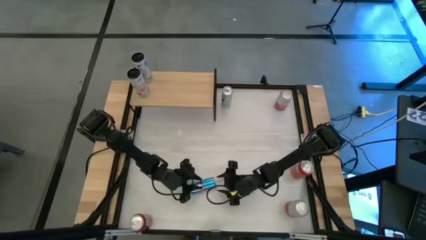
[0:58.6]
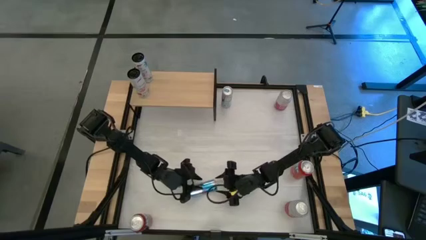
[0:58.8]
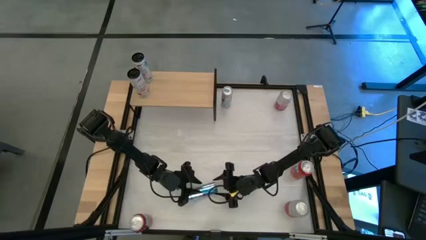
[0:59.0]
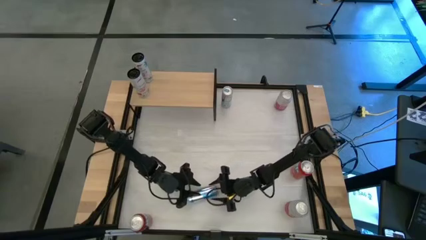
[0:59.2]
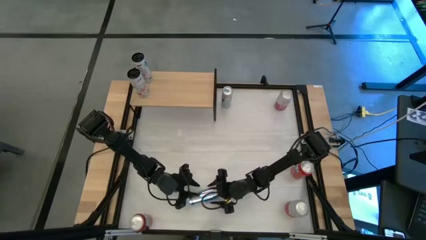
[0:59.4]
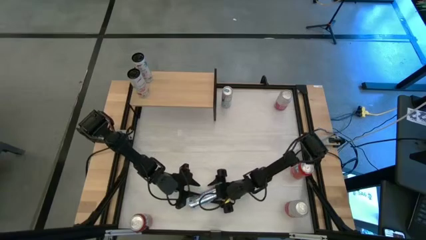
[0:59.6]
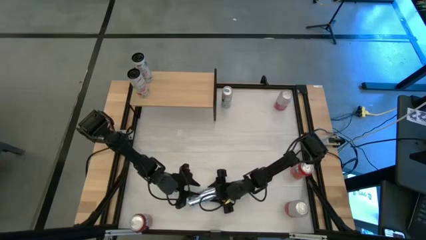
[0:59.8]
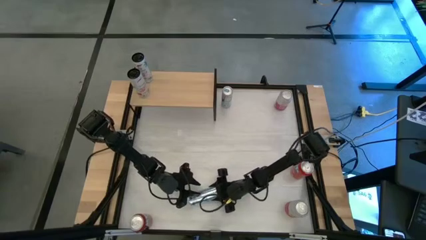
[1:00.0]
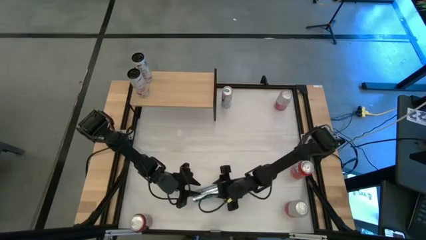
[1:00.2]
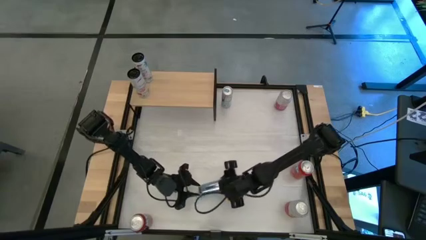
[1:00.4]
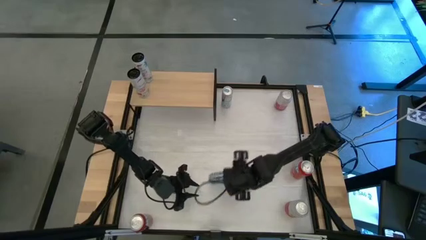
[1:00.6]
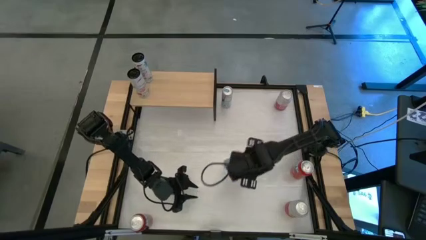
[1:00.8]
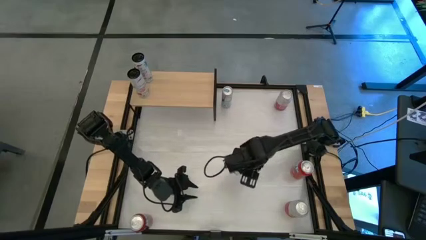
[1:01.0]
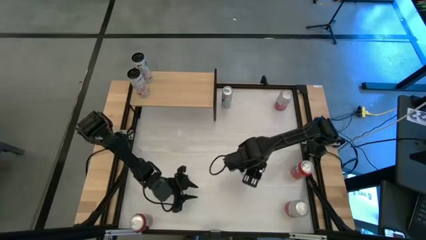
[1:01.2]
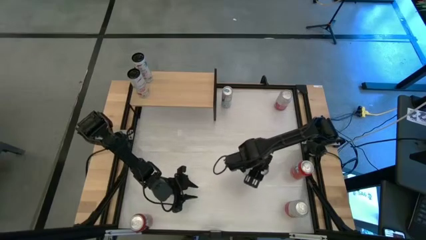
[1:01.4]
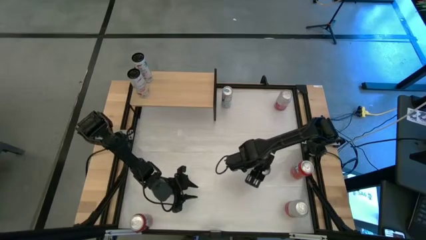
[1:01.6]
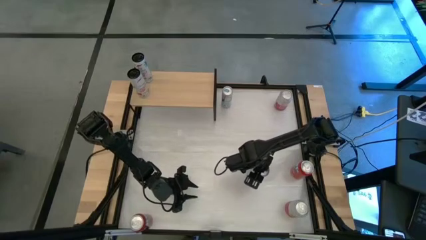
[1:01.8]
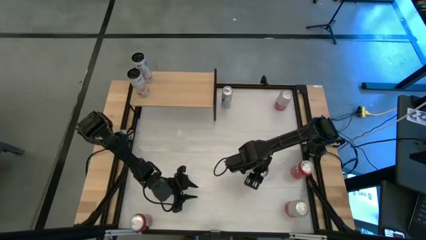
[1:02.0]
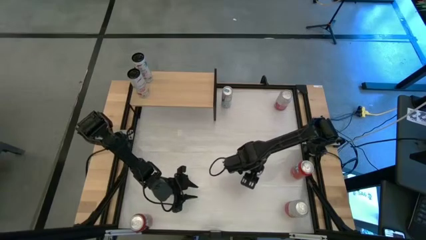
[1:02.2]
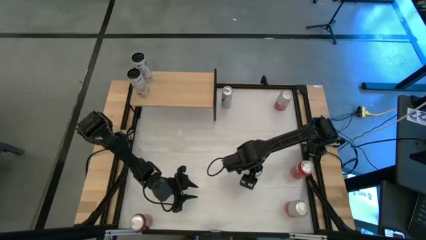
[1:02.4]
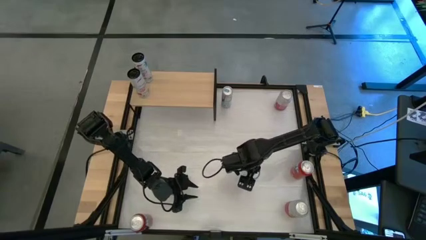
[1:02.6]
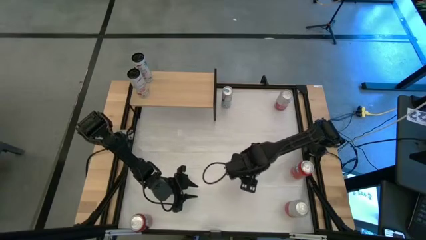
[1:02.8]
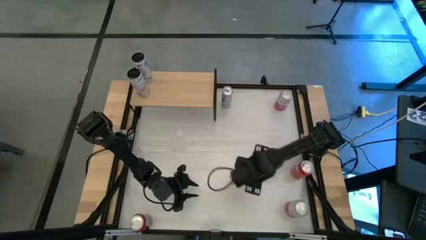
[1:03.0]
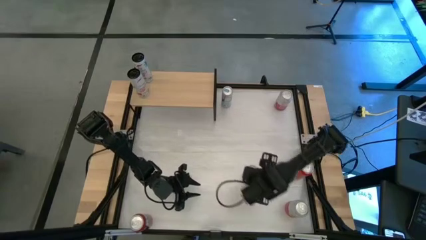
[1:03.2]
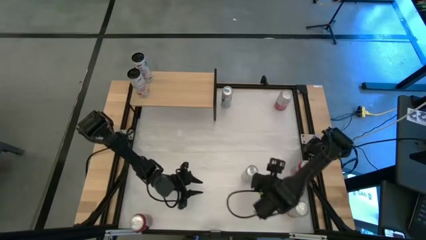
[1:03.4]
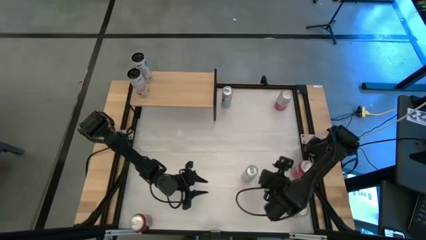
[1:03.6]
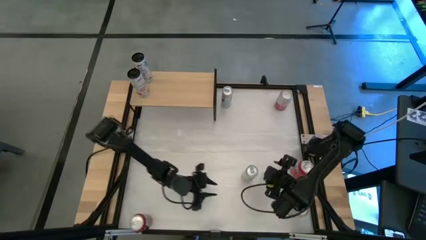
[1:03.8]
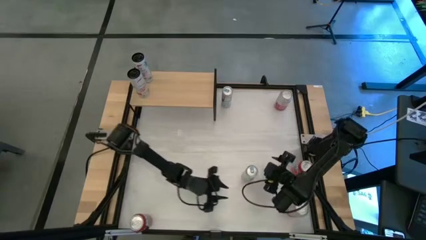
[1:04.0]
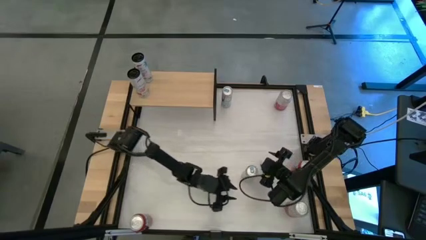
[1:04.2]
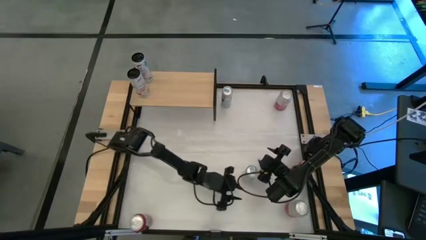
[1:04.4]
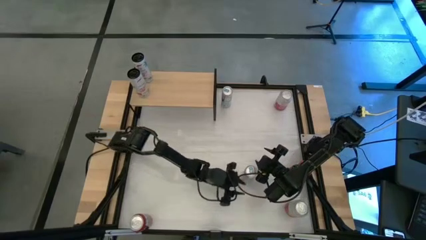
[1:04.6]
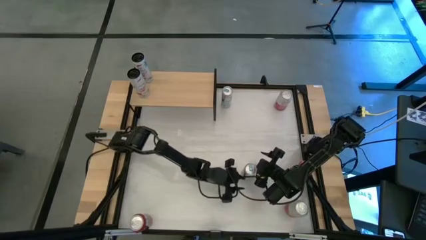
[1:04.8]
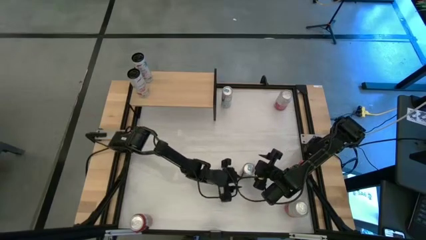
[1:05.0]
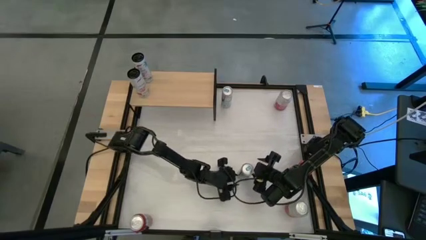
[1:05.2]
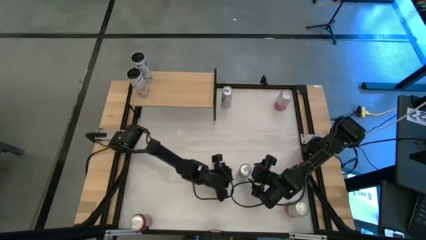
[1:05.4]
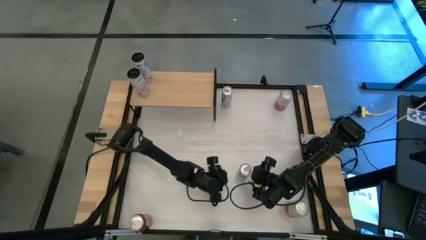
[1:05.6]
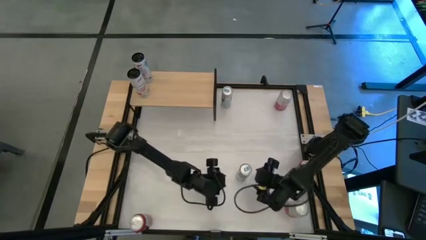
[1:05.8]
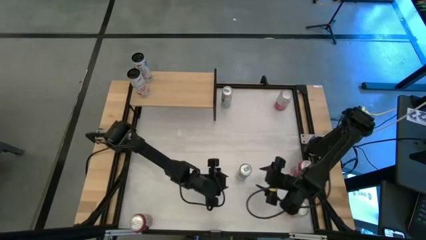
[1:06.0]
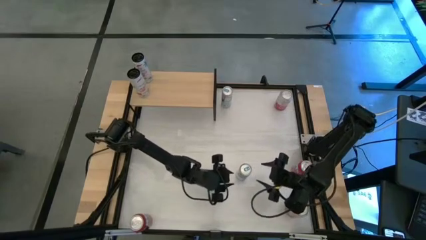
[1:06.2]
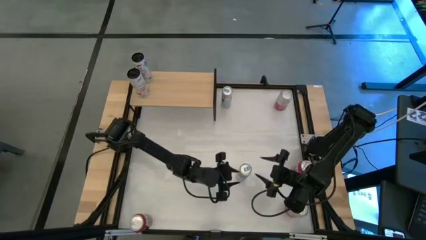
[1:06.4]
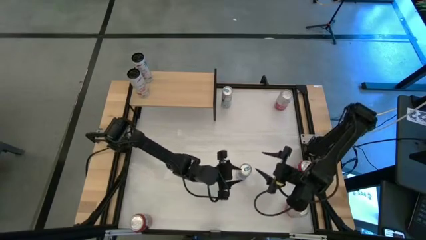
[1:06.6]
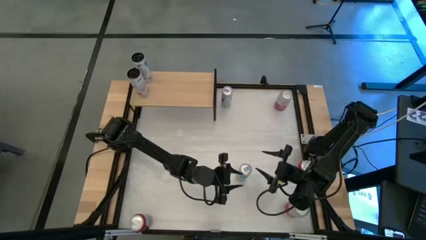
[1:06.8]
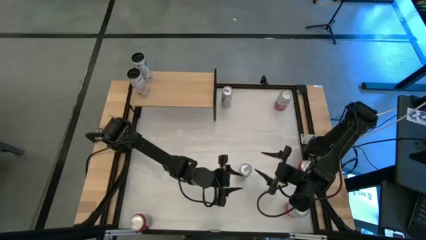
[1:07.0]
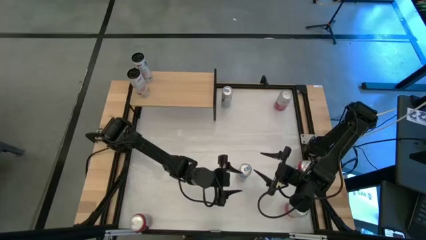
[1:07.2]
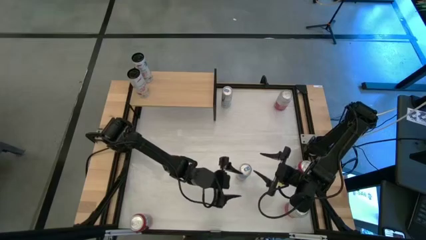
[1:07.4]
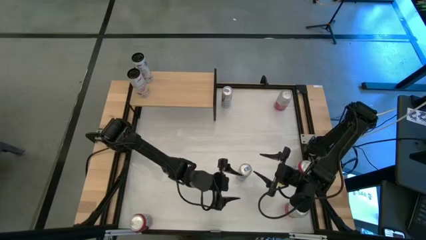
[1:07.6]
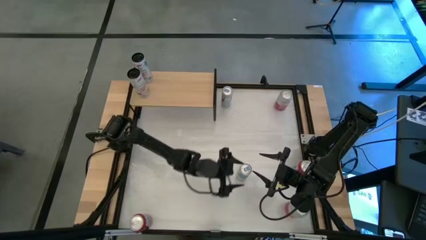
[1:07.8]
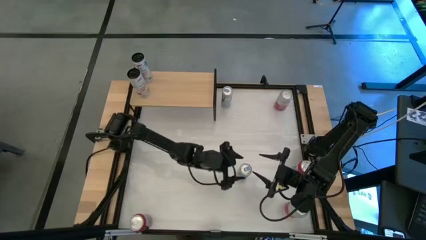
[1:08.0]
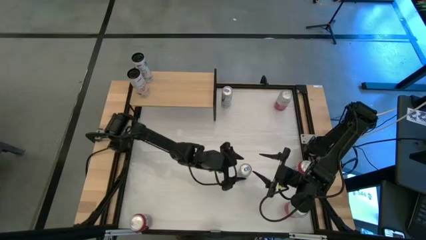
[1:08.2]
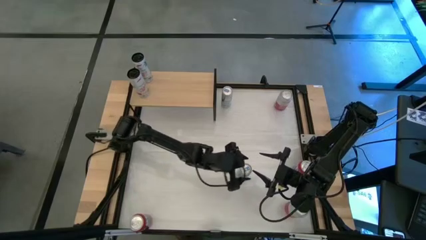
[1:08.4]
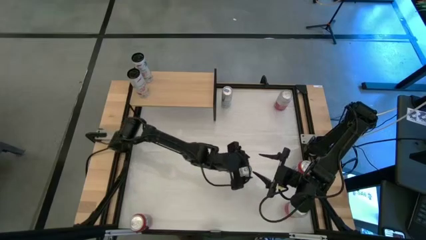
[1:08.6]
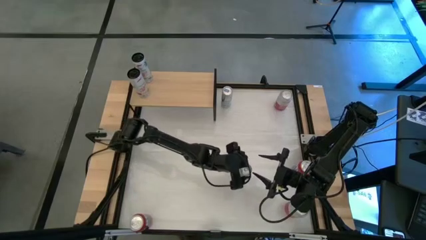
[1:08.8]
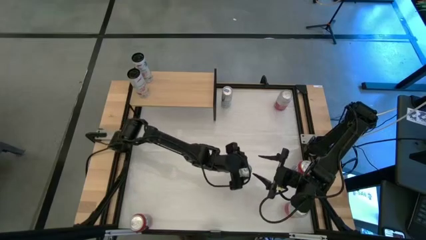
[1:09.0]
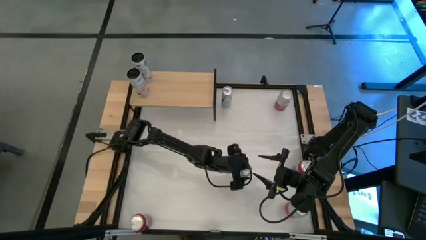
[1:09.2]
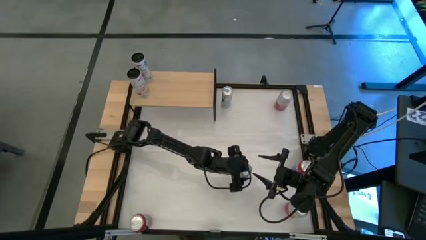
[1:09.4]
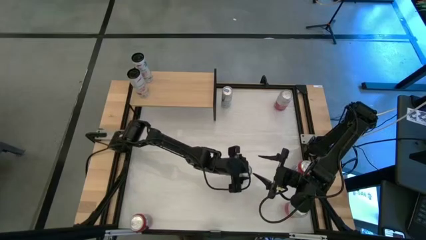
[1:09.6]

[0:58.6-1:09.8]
Task: Place canned beverage on shelf
Put the bottom blue soda can on the shelf

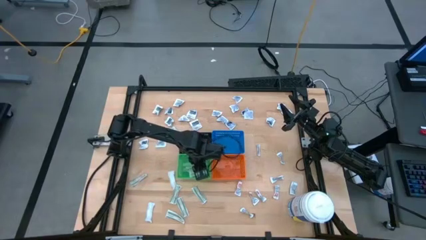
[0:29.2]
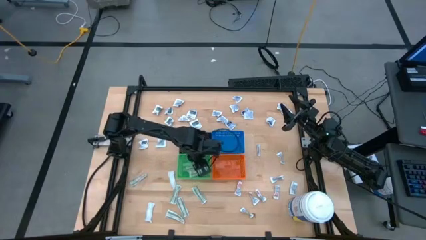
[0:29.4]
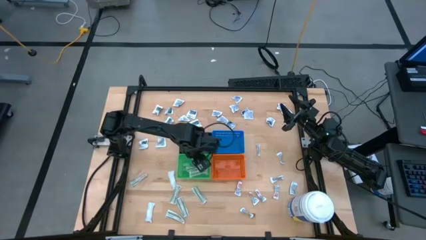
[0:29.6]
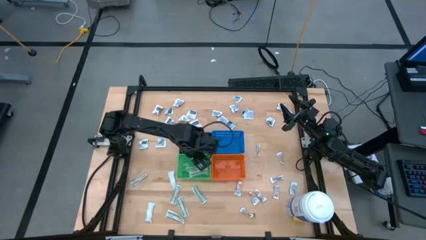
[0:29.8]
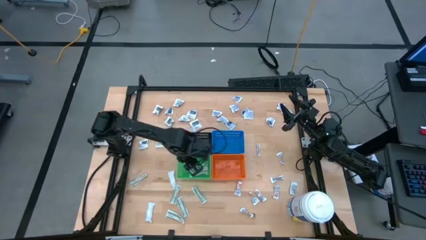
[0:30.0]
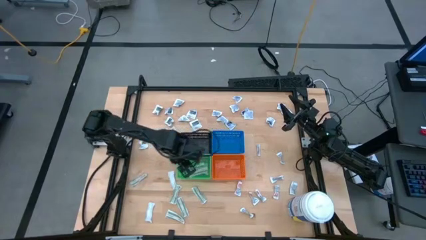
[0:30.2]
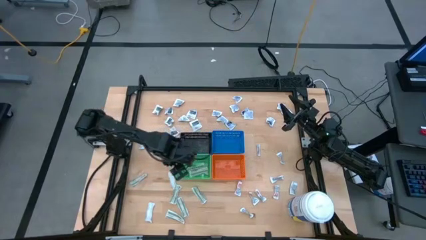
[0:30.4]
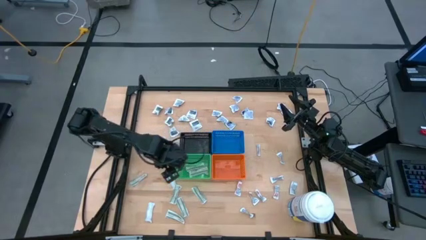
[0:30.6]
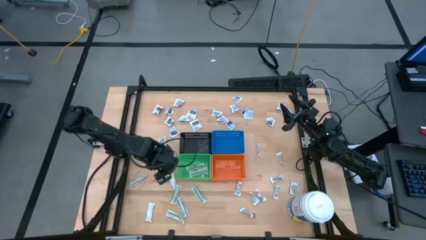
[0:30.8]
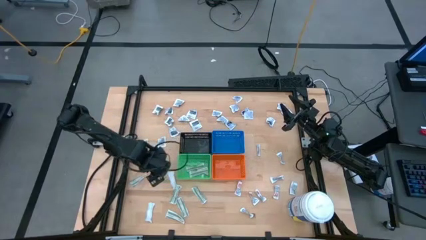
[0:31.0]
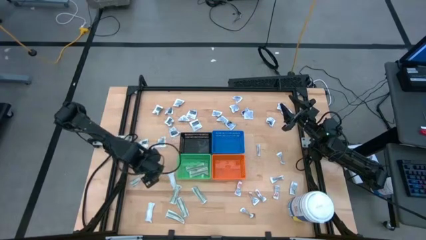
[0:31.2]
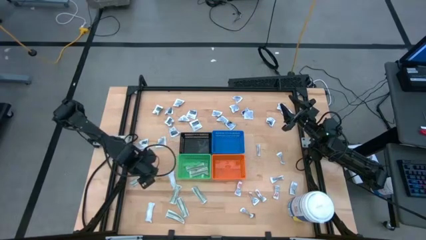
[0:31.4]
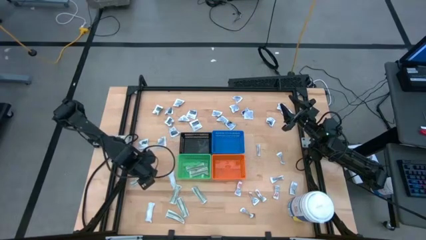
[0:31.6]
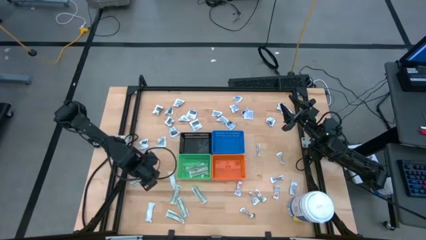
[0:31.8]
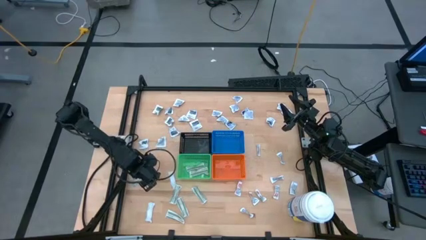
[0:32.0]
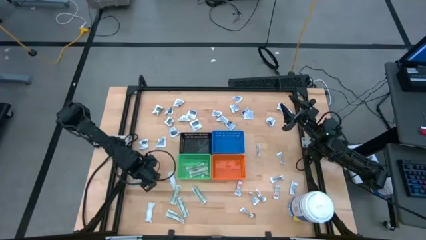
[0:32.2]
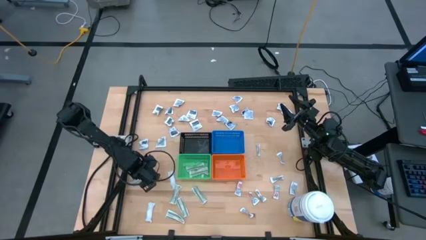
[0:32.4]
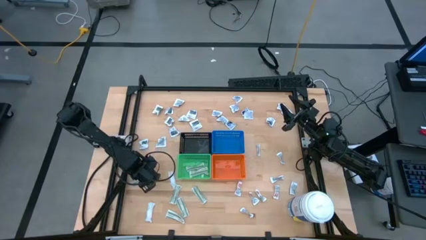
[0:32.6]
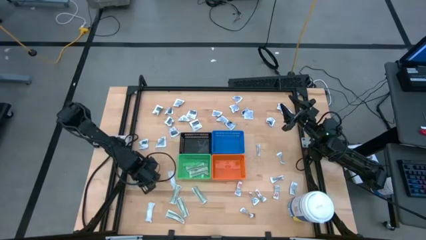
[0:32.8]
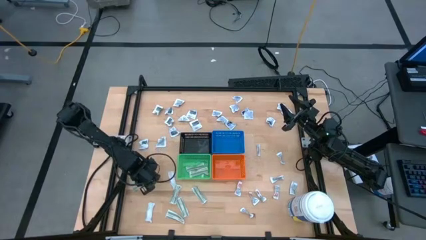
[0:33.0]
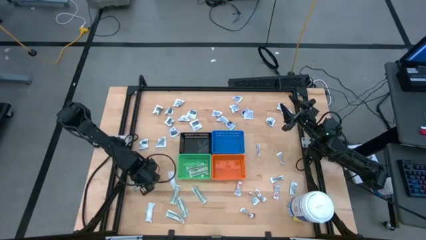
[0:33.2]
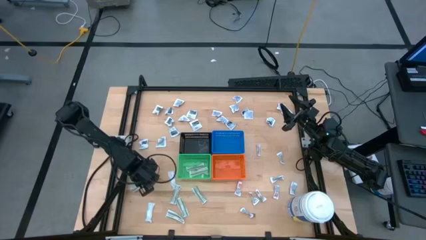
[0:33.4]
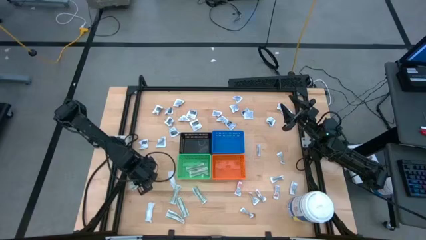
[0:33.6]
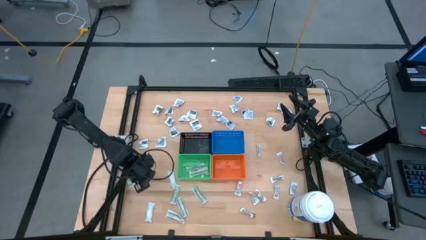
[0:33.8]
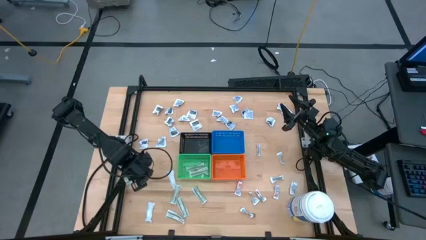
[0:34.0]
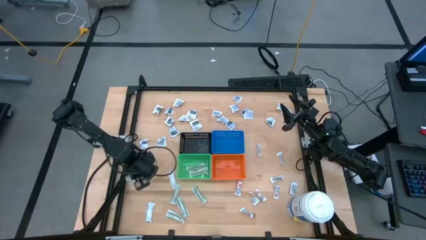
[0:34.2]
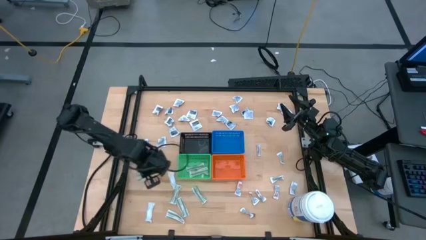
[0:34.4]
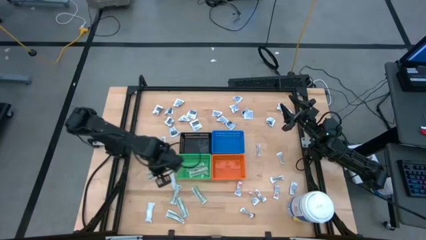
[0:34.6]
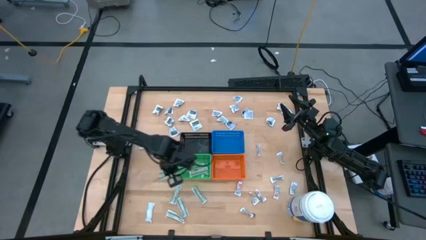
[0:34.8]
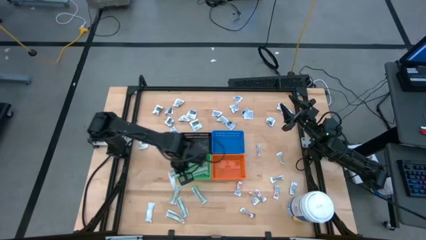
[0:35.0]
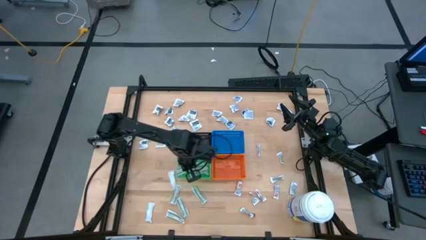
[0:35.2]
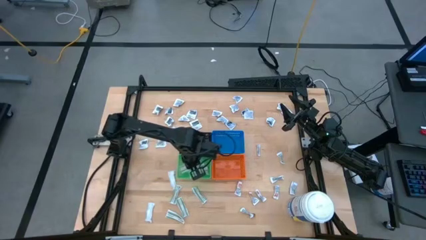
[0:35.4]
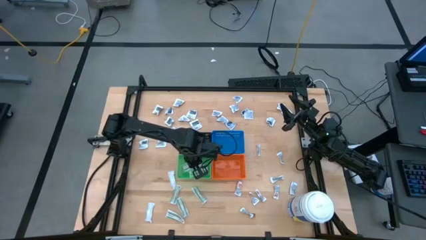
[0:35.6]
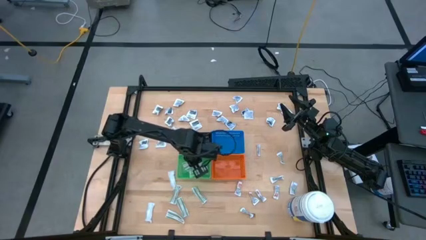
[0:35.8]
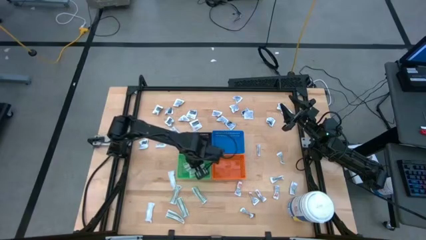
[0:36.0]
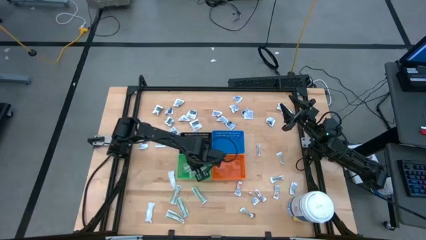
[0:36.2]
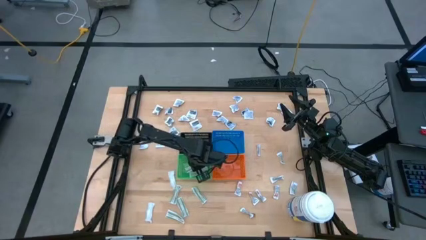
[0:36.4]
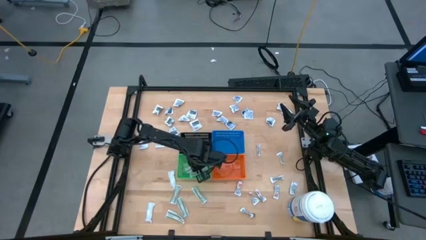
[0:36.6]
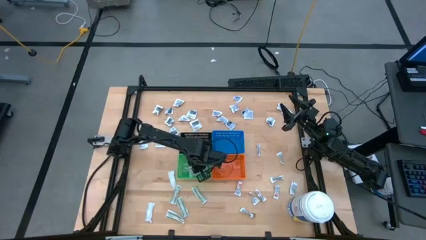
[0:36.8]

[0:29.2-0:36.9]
Task: Pick & Place First Aid Supplies
Put the bandage into the green bin
